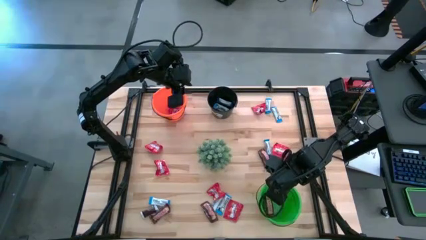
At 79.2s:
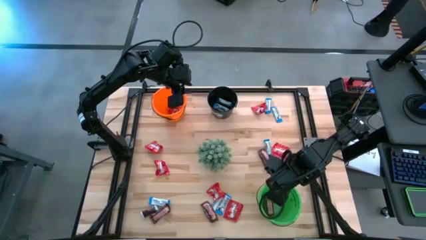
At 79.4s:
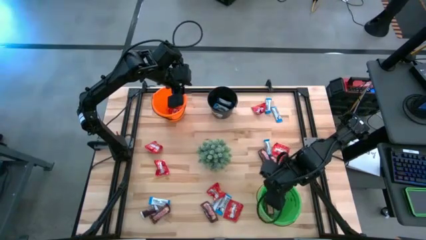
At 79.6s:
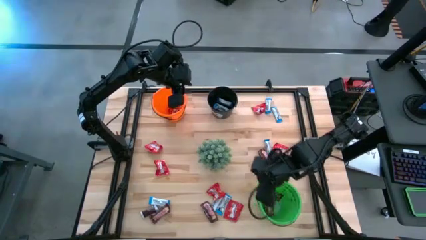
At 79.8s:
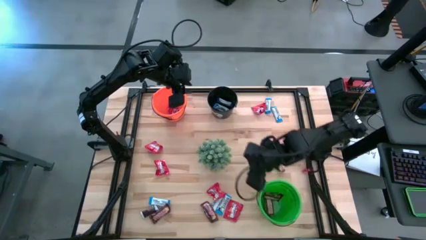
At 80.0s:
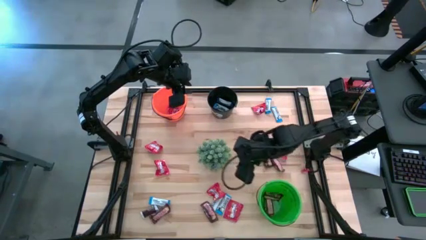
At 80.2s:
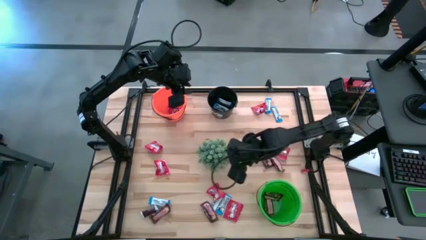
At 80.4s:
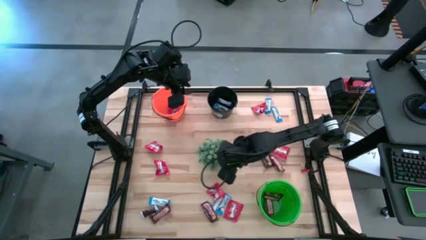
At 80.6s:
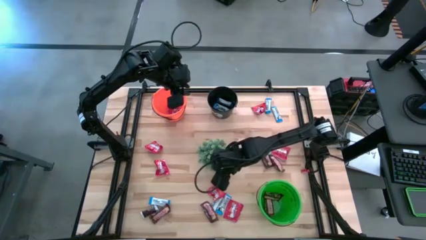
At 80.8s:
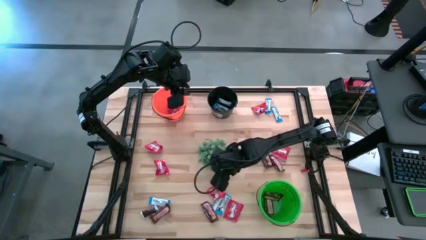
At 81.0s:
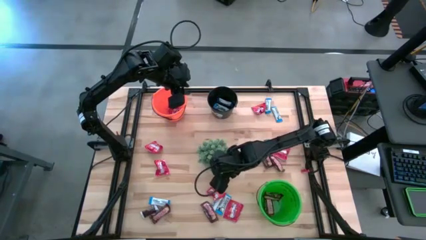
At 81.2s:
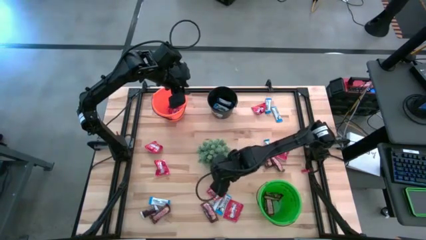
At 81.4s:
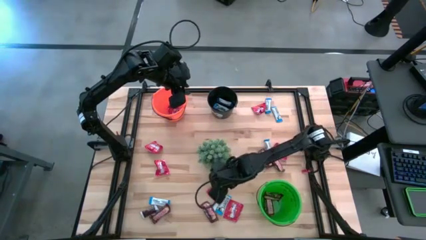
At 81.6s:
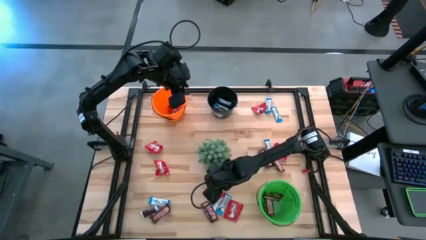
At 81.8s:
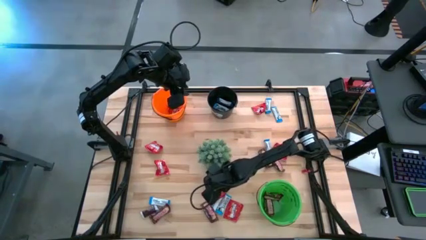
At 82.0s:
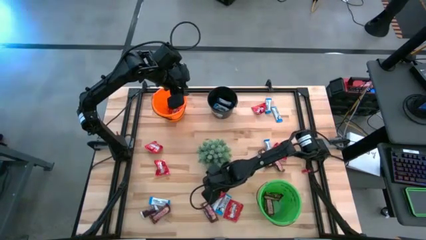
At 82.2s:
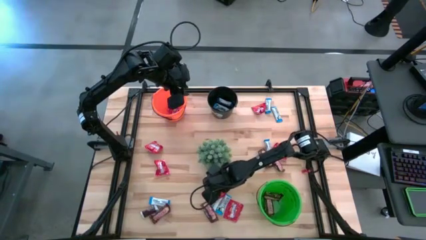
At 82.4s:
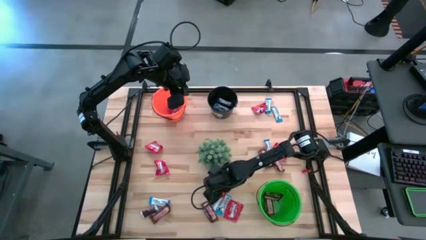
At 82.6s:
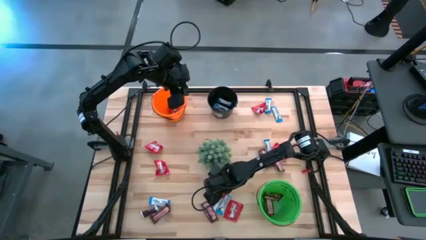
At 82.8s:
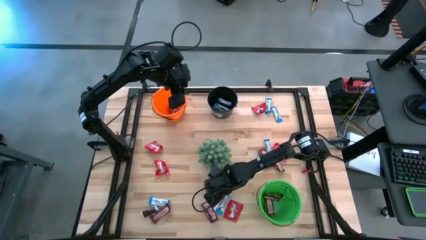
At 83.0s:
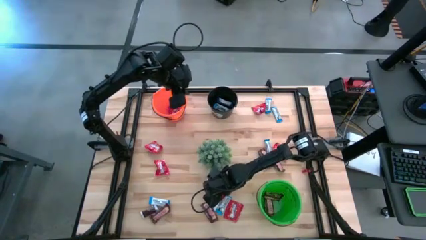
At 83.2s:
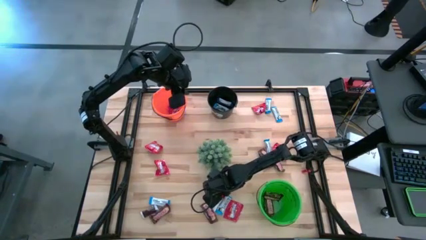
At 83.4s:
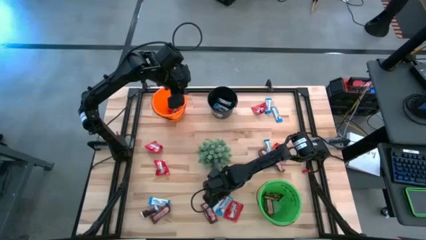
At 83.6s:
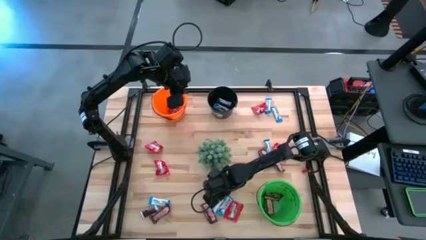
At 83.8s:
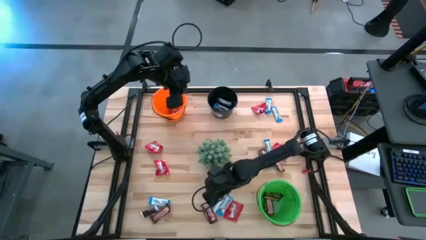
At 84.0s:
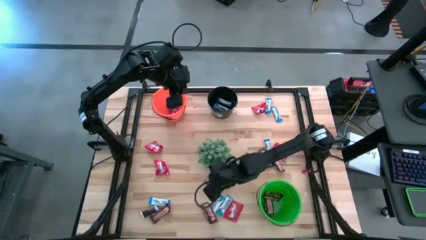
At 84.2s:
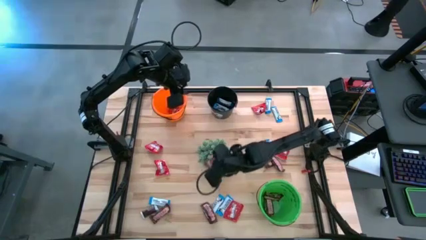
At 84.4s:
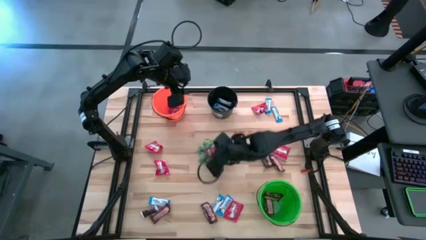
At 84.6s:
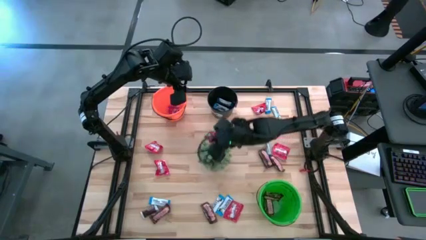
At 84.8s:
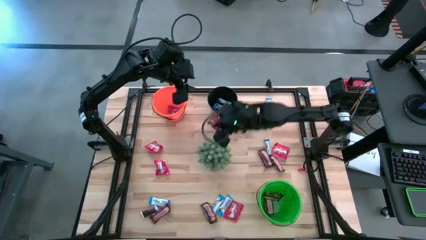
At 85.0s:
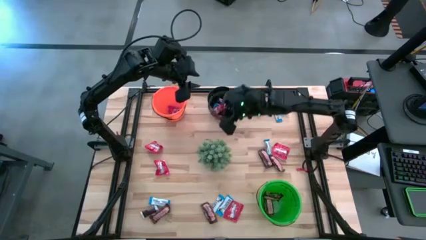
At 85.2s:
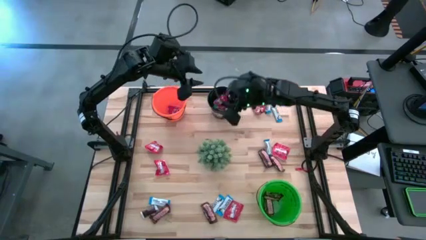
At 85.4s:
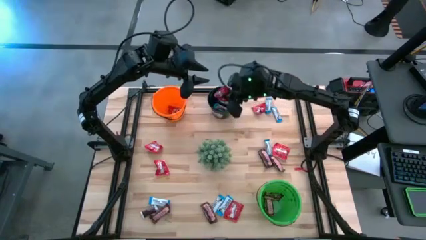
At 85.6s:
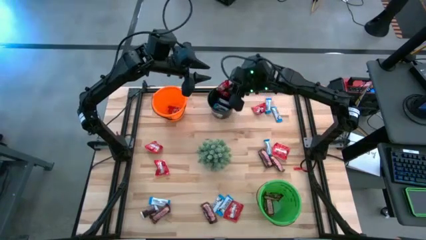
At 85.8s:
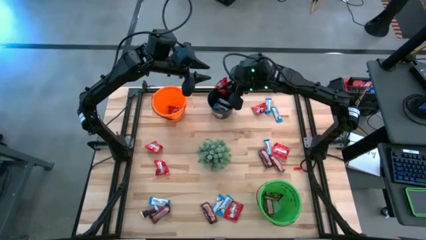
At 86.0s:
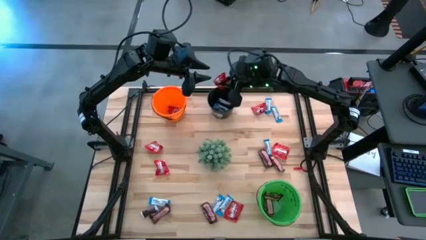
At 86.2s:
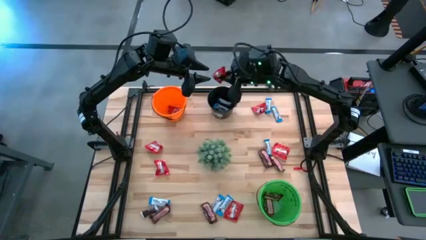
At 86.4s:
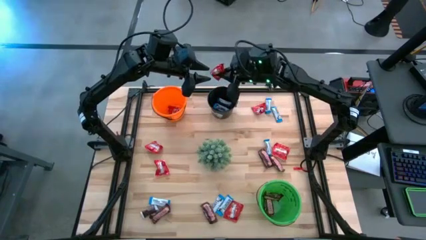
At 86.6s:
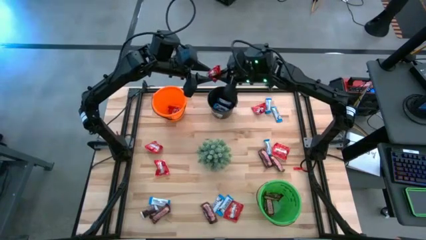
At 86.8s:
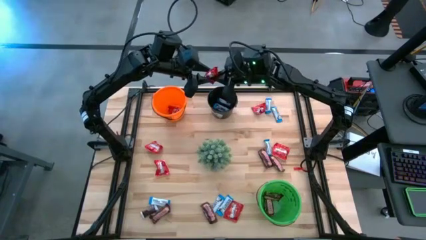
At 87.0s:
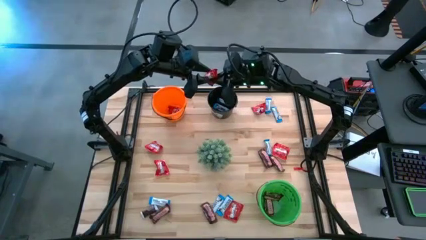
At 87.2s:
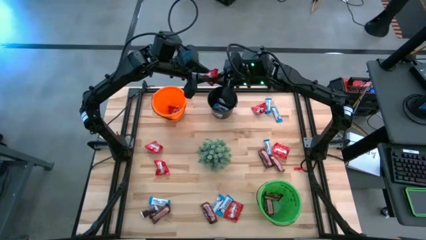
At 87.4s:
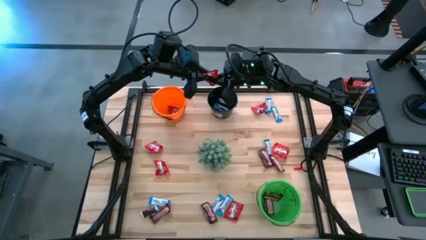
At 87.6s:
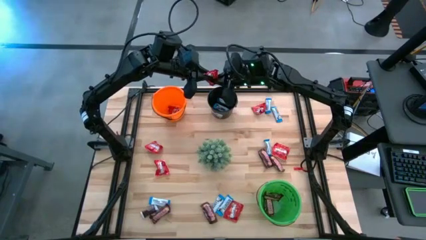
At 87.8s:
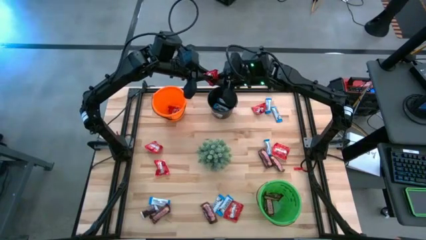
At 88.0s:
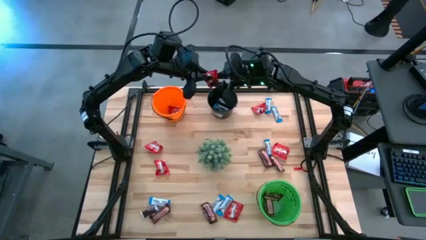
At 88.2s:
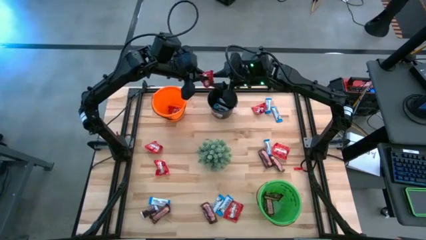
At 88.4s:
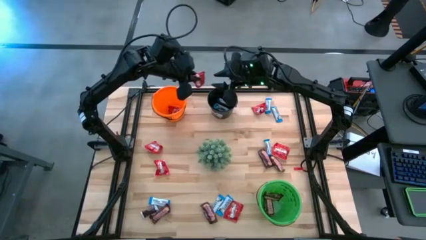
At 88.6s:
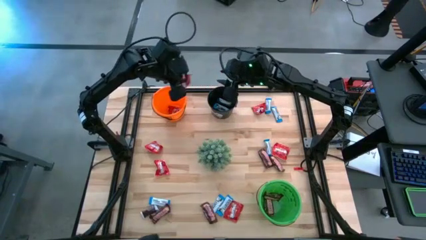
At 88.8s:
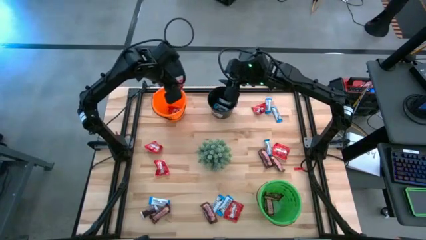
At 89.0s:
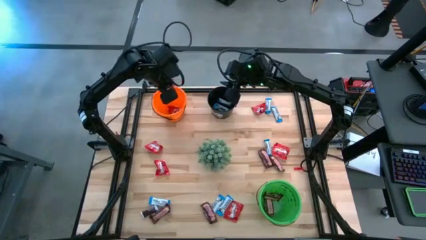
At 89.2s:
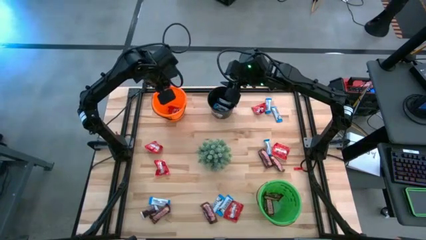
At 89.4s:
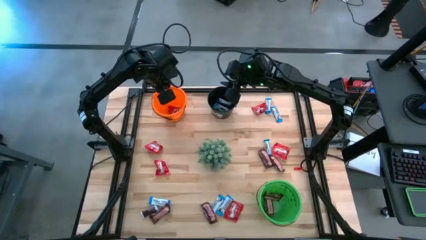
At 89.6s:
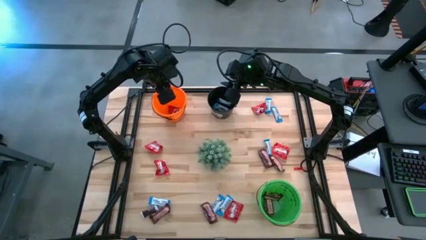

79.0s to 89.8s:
Task: Organize candy in baskets
Put the red candy into the orange bucket

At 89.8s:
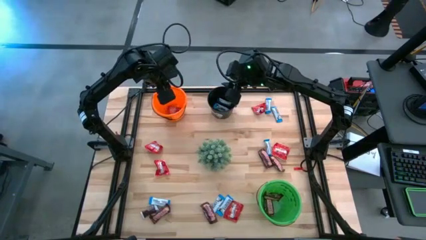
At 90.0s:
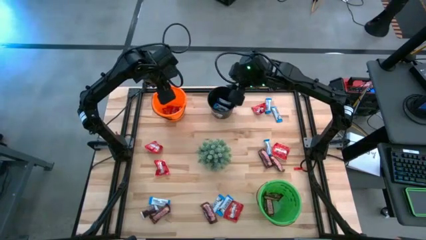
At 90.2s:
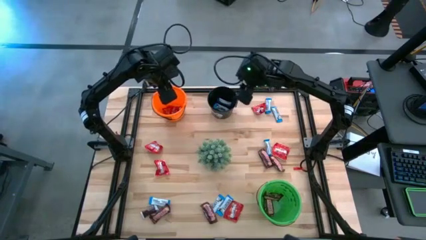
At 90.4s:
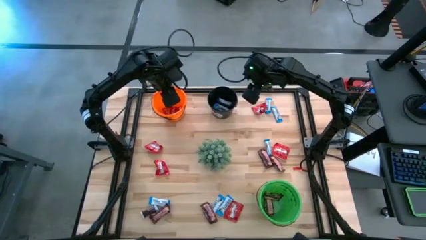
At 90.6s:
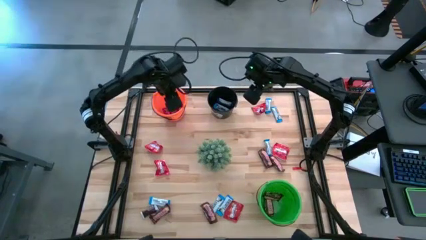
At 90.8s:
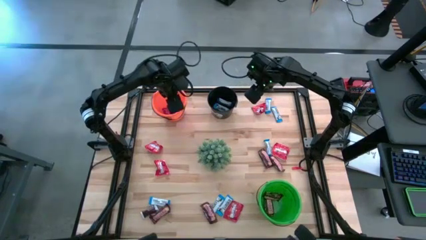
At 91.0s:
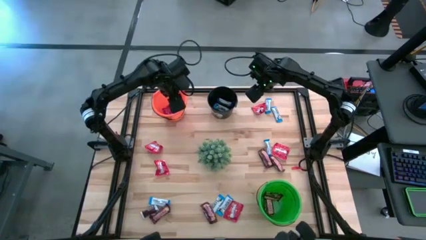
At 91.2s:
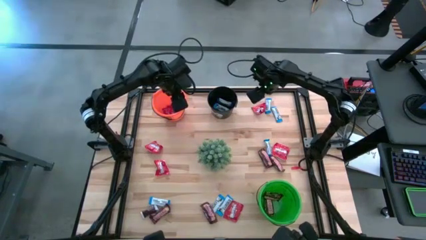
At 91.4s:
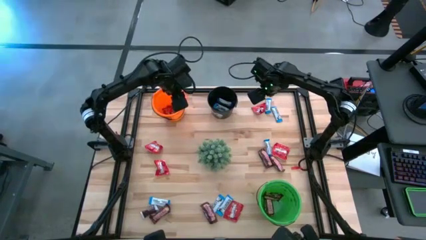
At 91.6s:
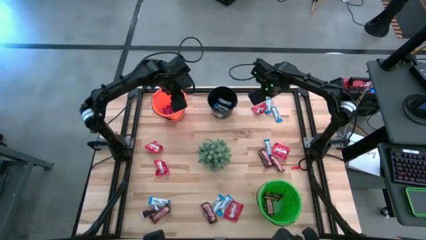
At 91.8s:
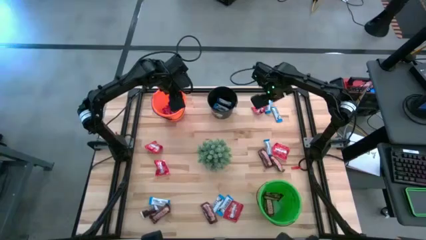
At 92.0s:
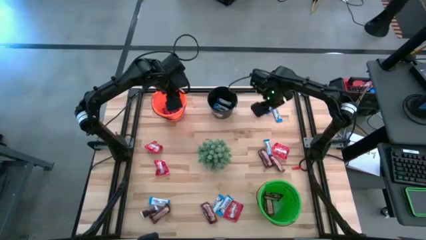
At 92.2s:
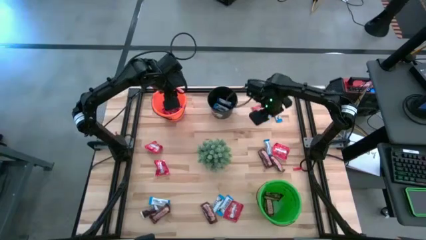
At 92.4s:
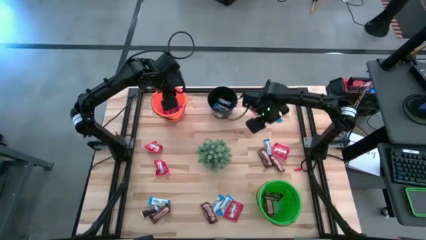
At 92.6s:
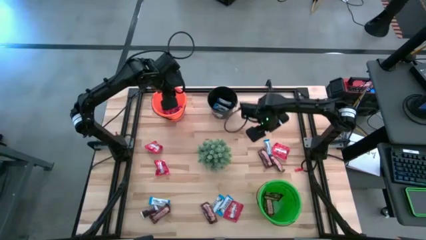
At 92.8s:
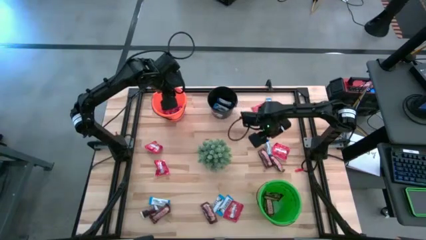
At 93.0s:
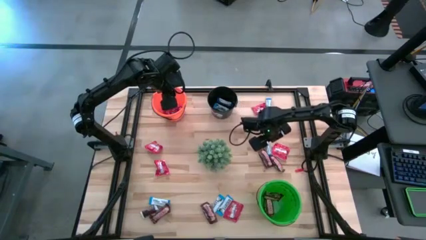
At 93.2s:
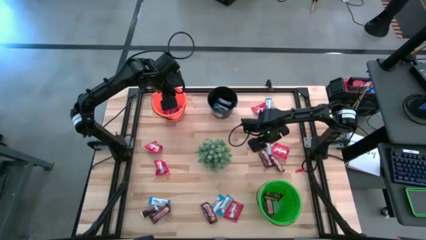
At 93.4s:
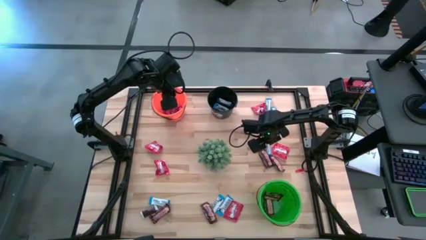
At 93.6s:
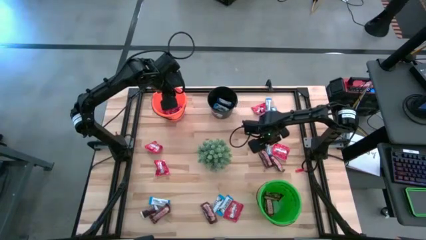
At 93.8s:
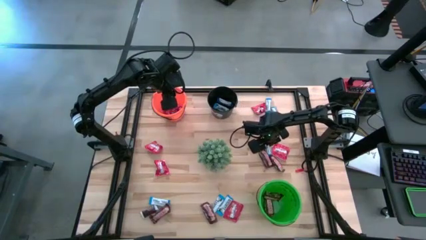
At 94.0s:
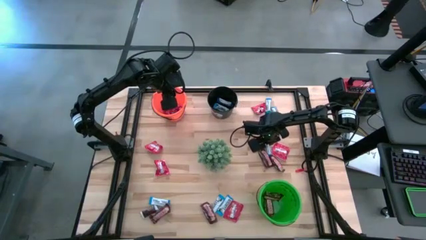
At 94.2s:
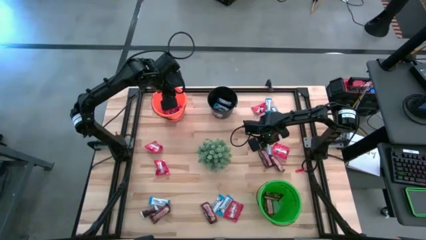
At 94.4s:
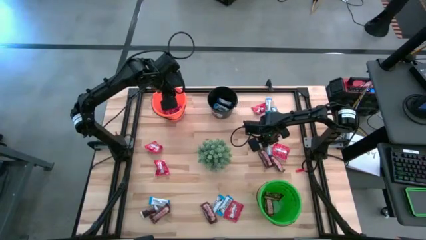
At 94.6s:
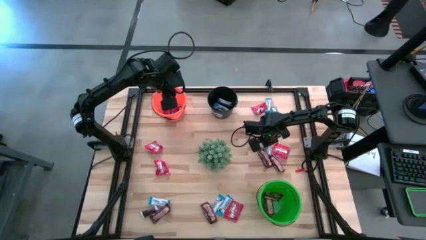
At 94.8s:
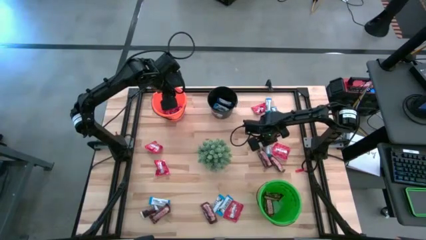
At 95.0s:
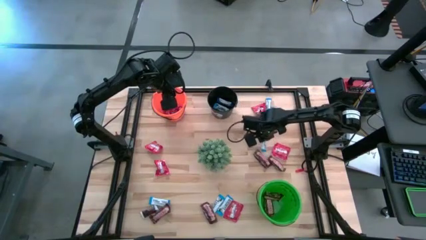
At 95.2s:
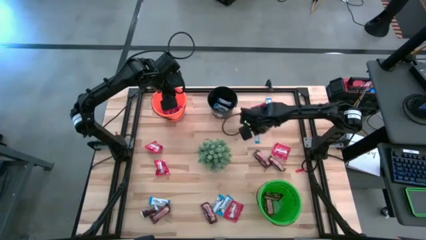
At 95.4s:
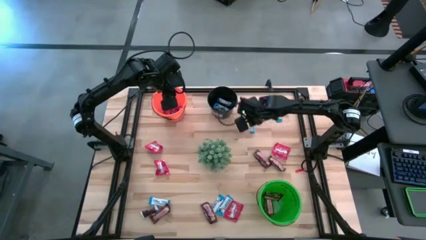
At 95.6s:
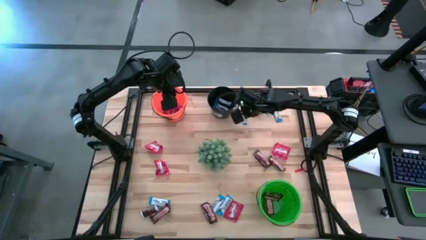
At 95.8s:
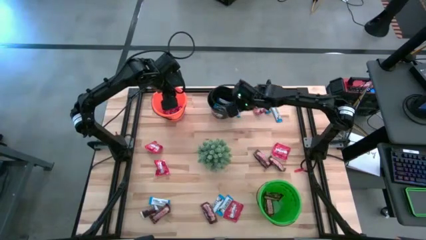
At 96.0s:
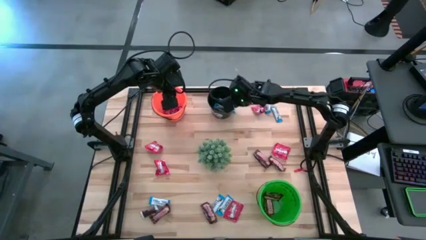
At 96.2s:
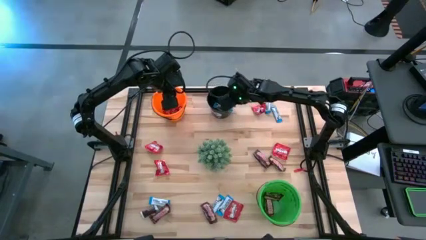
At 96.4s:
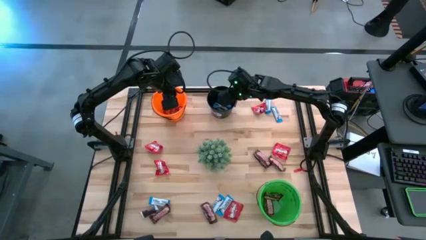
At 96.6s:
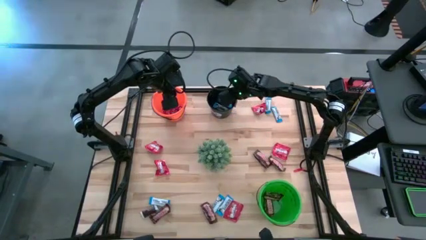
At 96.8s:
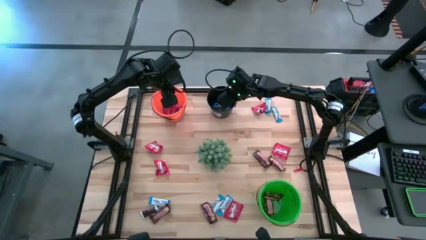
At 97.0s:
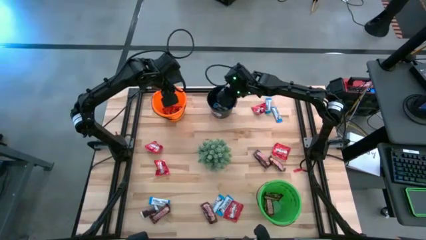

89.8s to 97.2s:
Put the white chocolate bar into the black bucket
